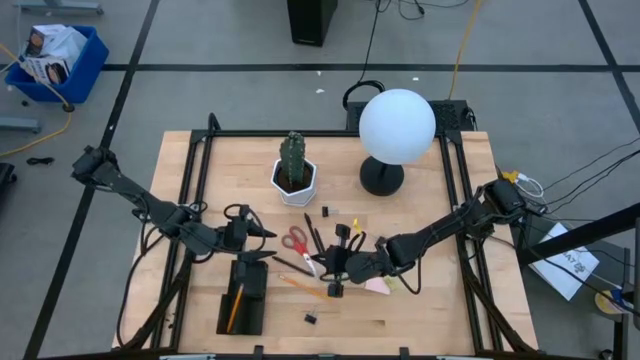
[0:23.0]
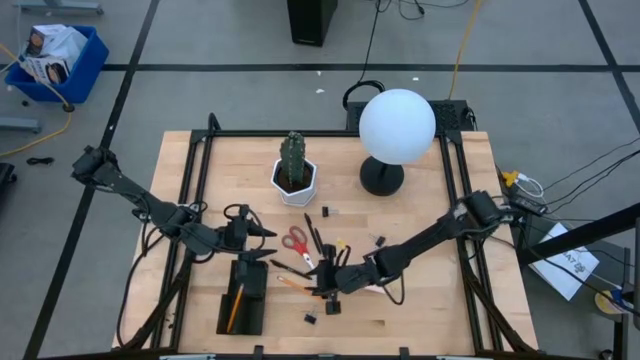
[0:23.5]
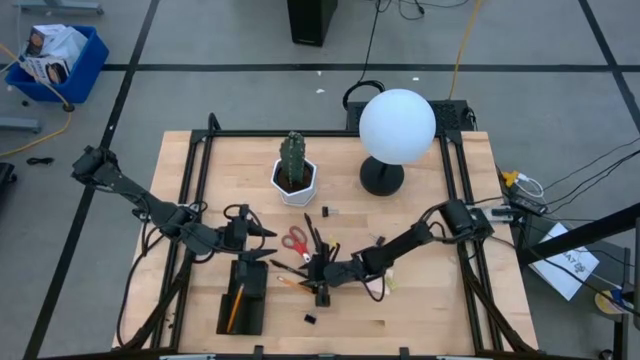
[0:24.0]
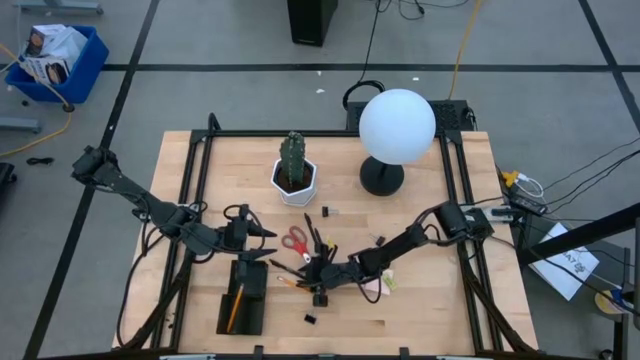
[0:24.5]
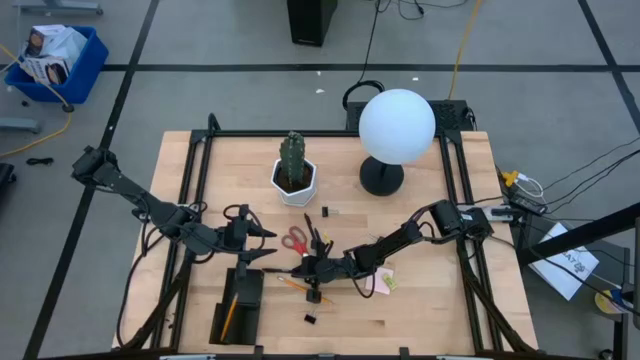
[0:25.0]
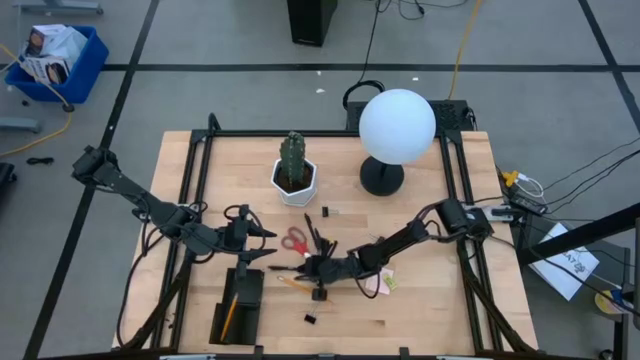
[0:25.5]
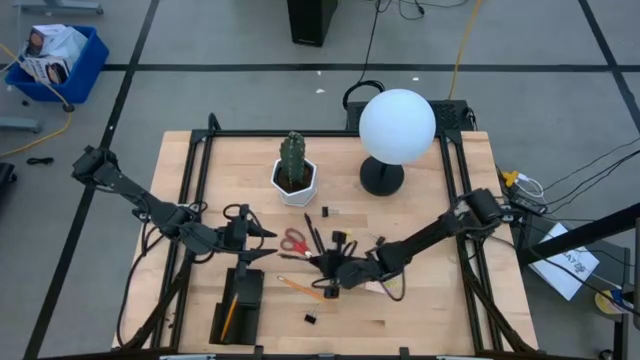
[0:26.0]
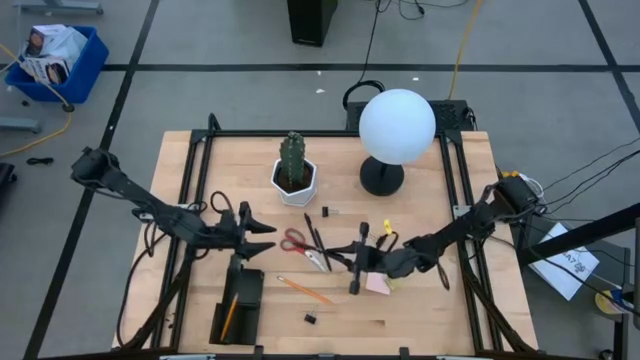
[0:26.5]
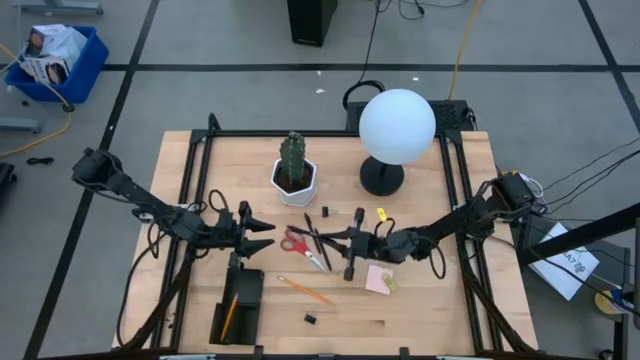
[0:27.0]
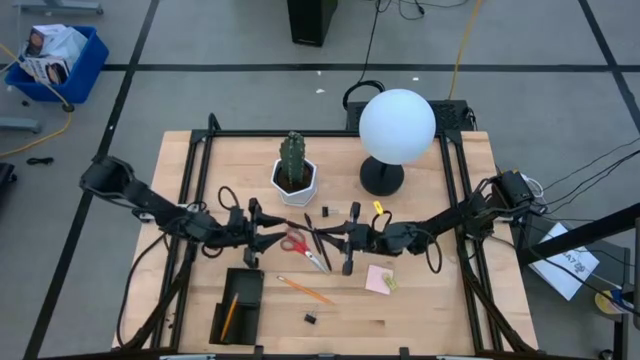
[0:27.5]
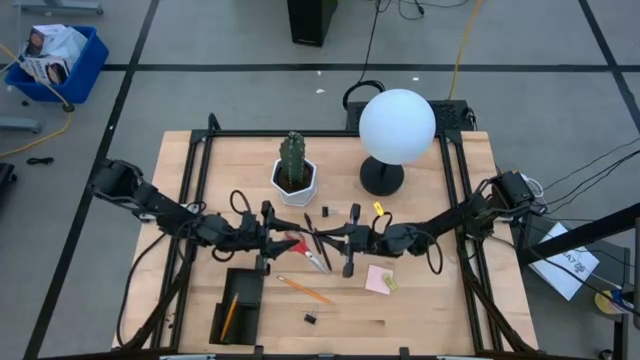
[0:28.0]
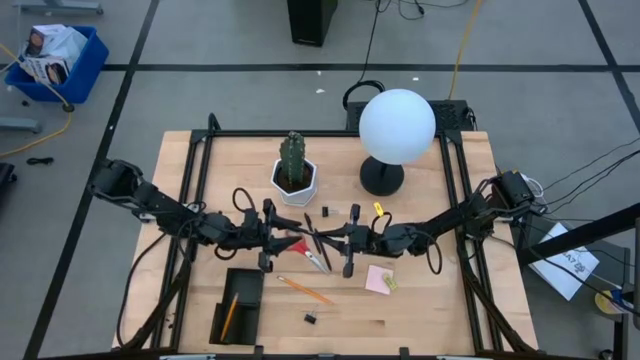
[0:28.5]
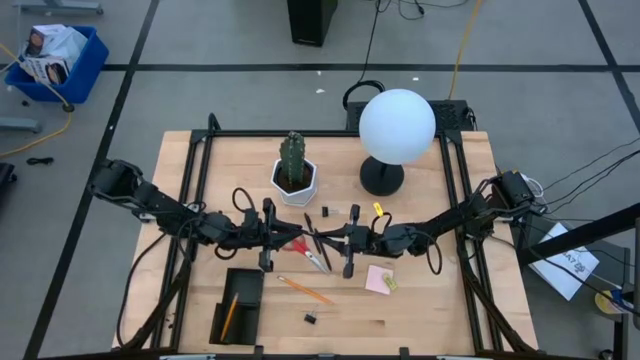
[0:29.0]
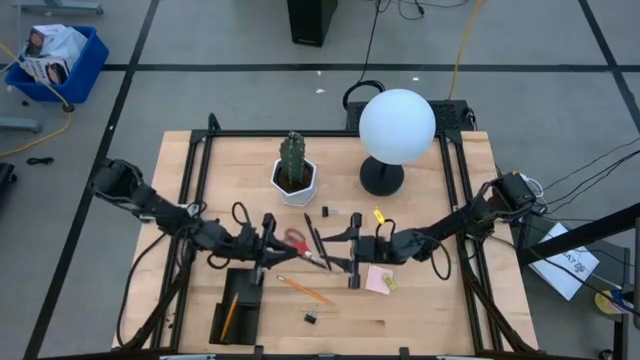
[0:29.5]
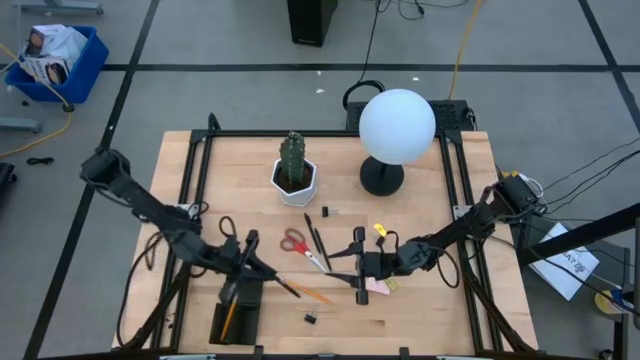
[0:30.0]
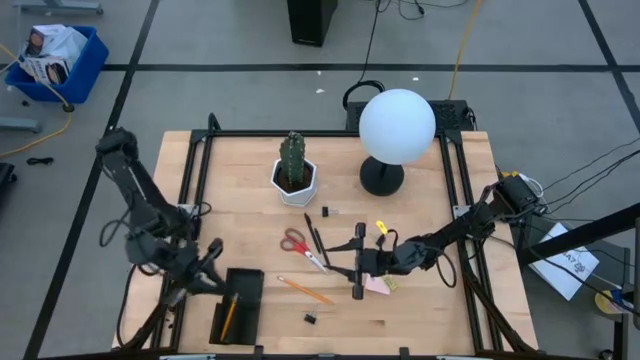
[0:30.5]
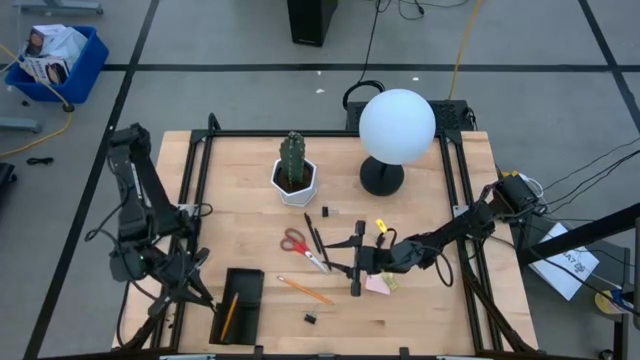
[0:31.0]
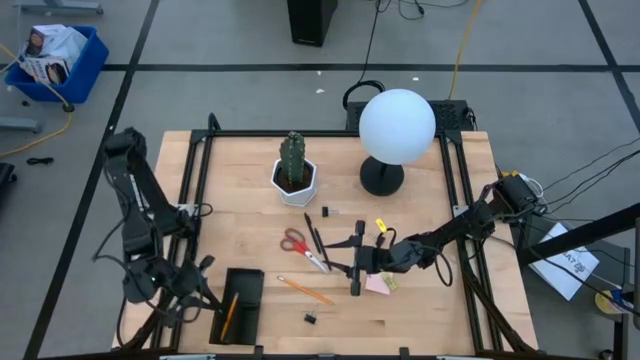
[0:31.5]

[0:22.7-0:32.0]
Task: Pick and place office supplies into organizer
Put the left pen in the desk organizer

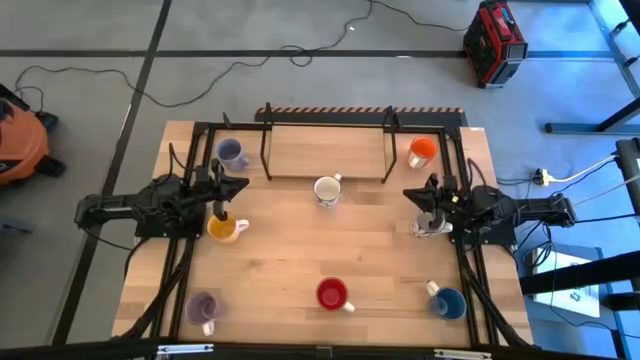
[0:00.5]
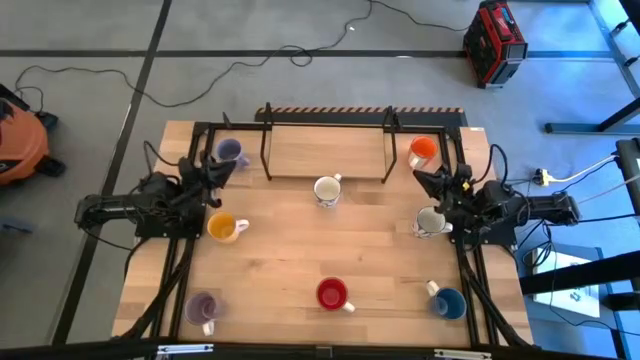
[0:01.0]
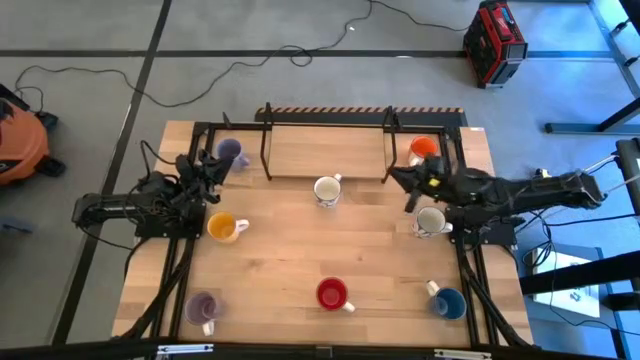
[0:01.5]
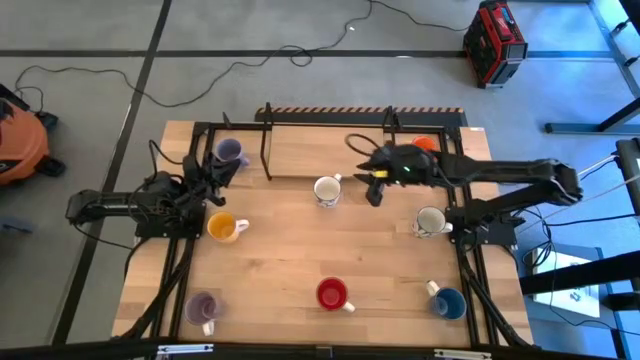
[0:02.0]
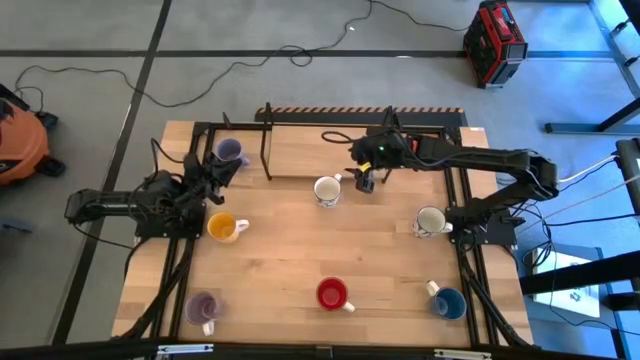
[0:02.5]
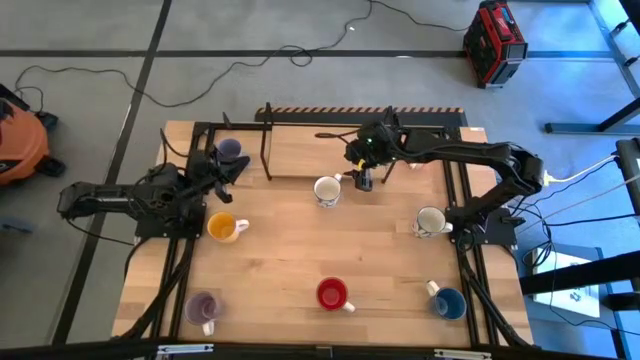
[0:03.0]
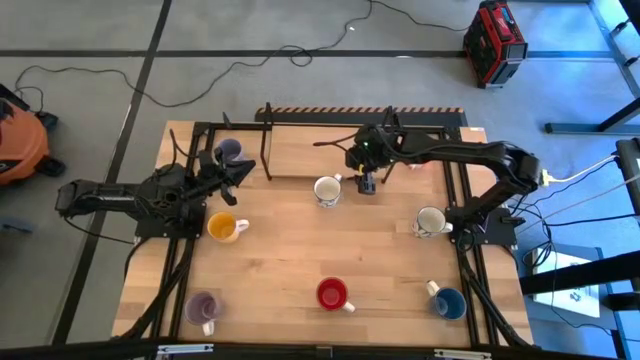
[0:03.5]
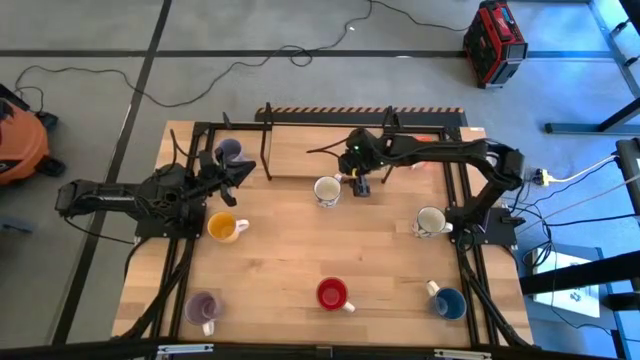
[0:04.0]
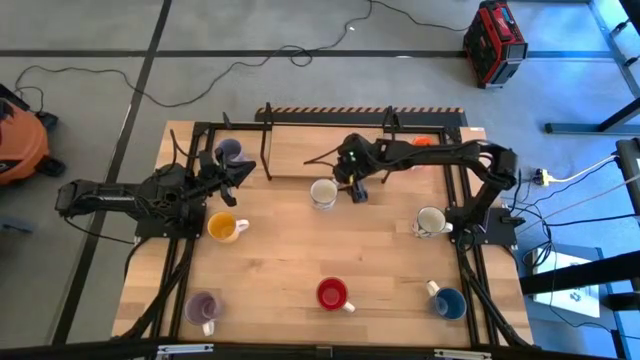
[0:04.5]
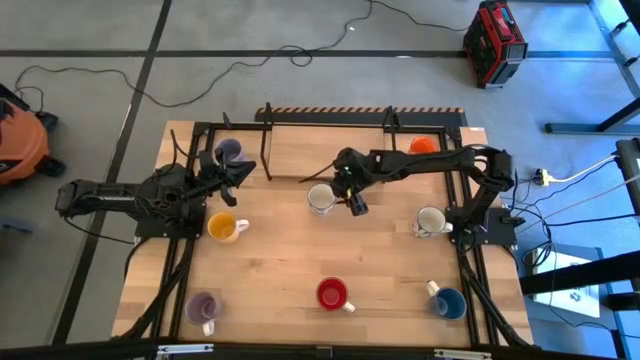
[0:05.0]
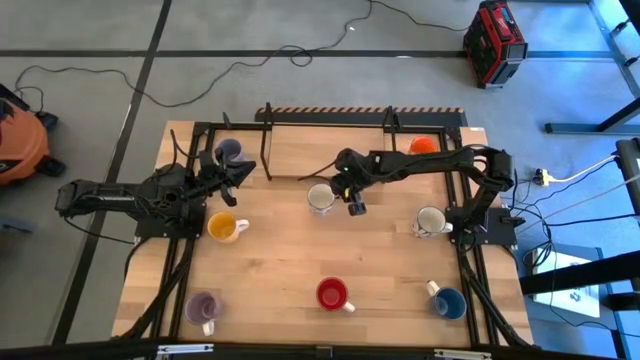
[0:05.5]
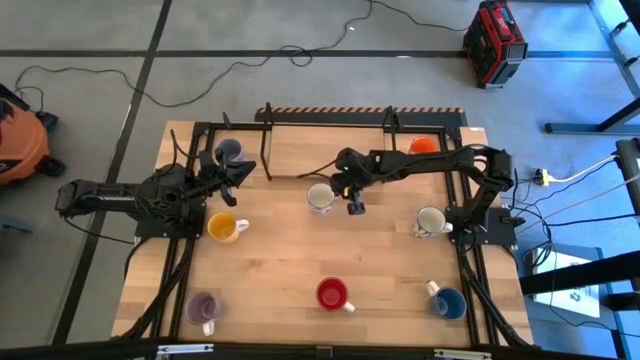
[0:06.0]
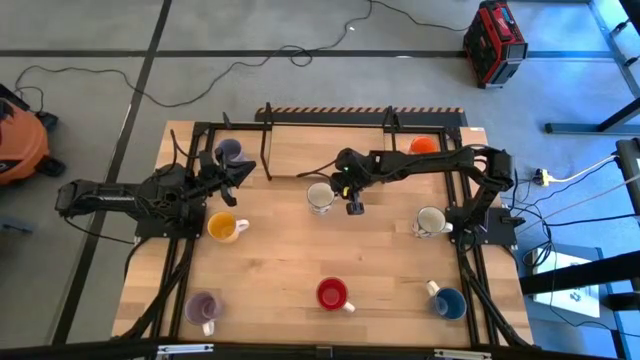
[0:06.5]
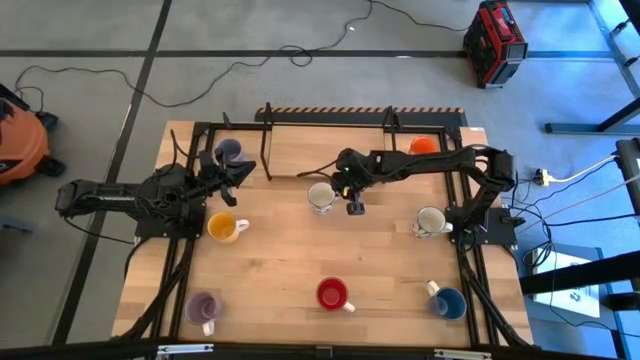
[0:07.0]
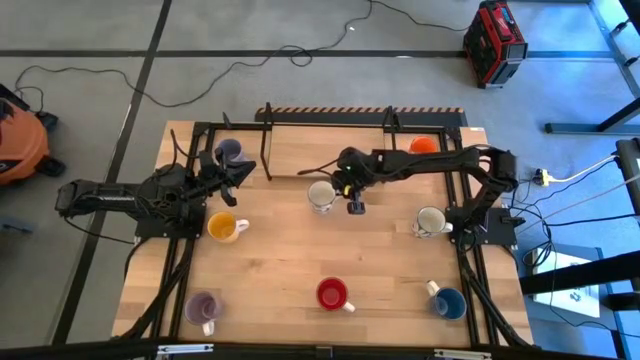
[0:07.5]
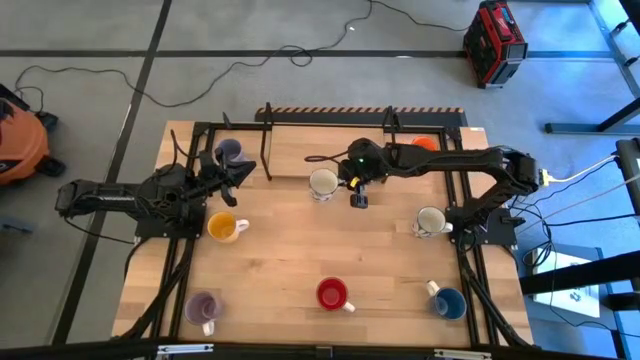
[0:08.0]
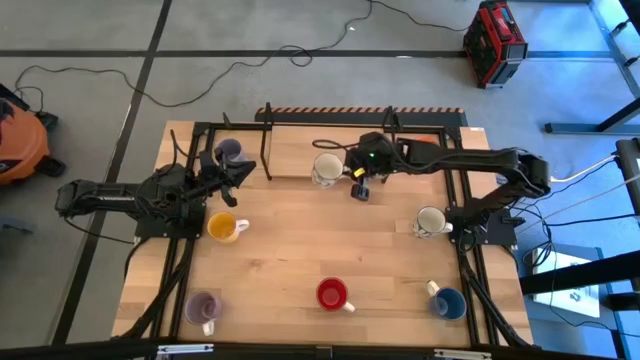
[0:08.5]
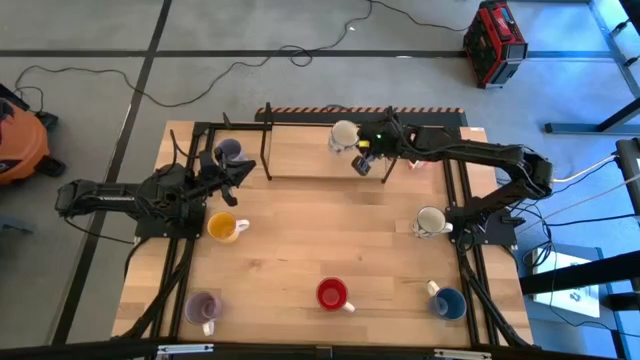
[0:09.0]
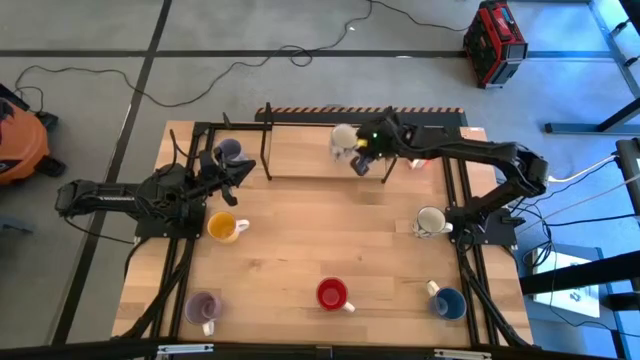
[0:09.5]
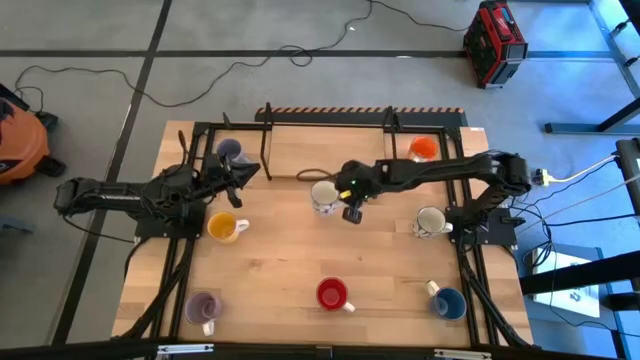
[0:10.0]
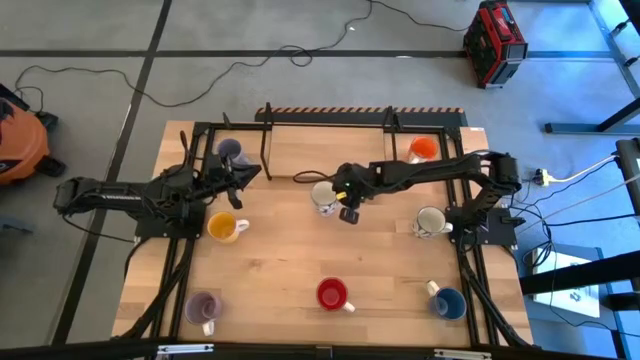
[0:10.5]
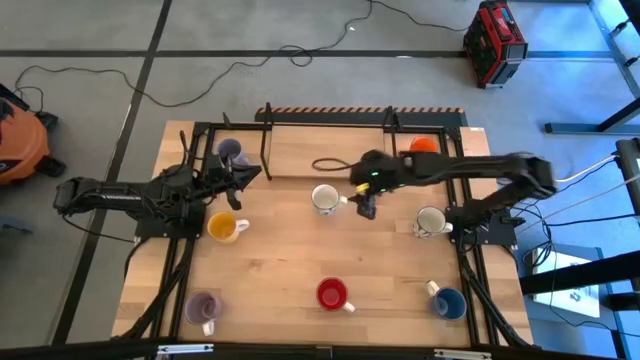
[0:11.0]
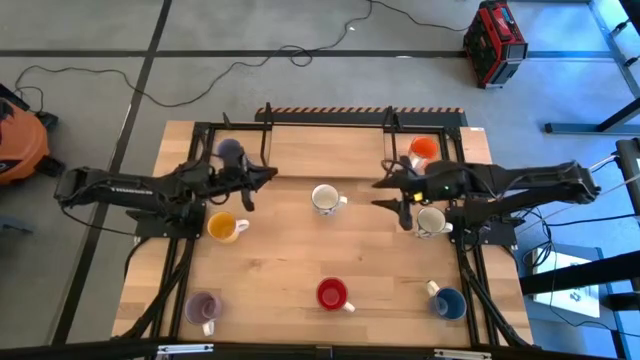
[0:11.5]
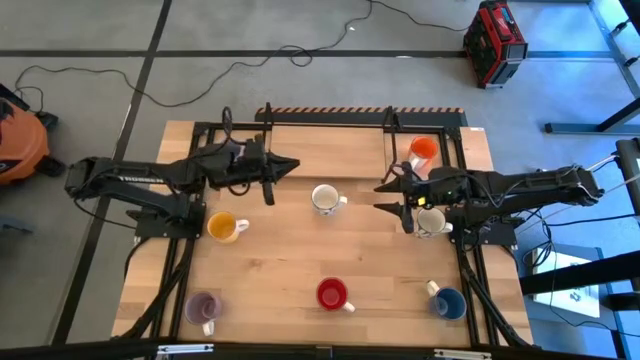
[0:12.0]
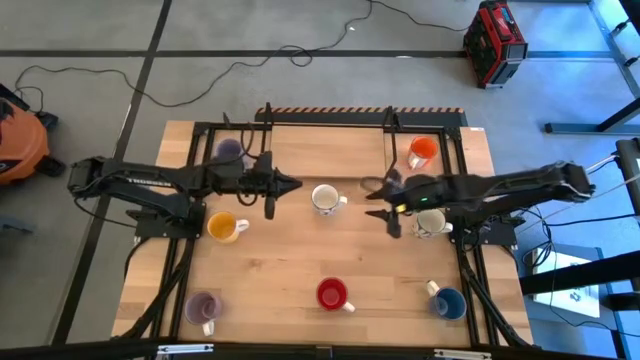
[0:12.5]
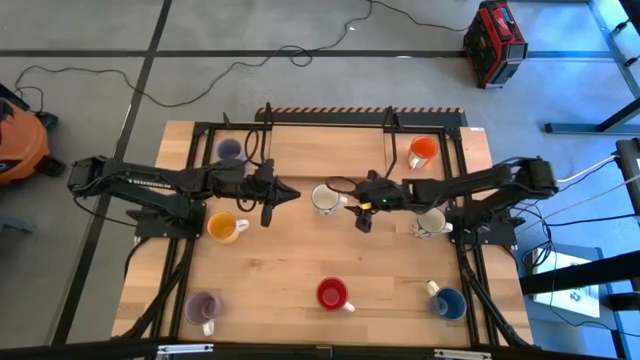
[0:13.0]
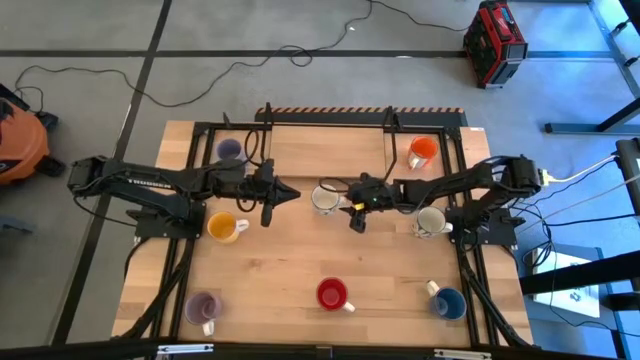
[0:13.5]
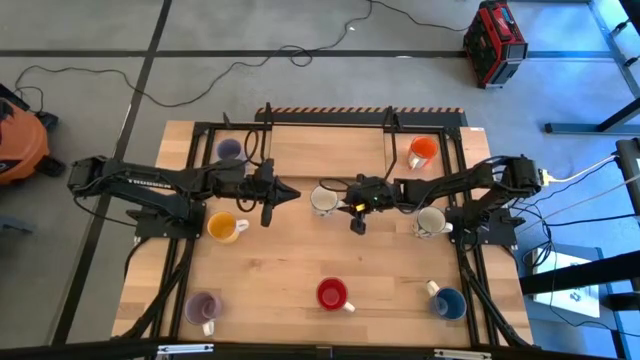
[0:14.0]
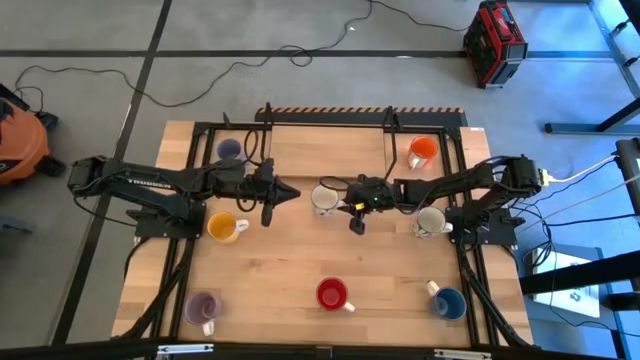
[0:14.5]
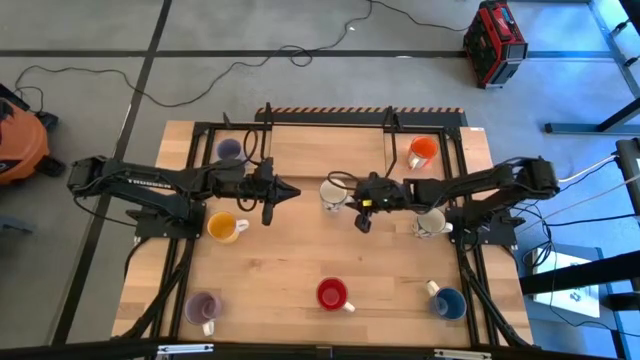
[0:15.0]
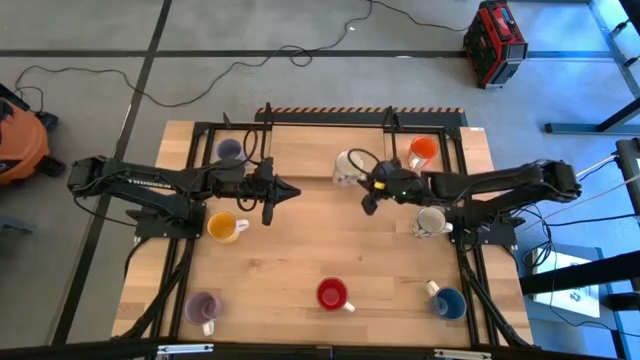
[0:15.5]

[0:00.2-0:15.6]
Task: Place coffee mugs
Put the top blue patterned mug on the shelf
